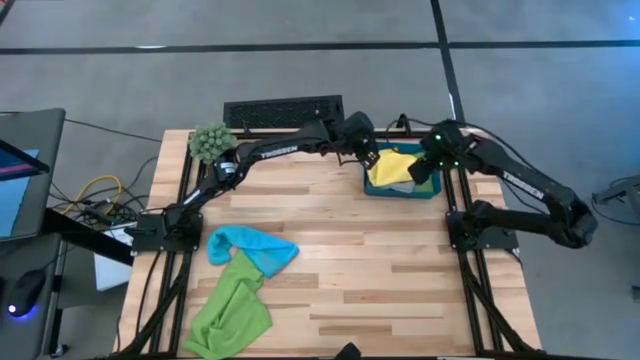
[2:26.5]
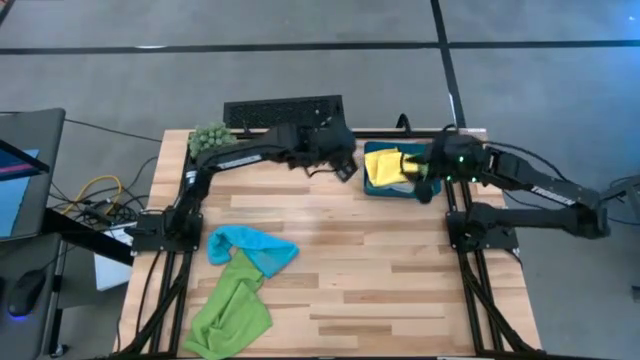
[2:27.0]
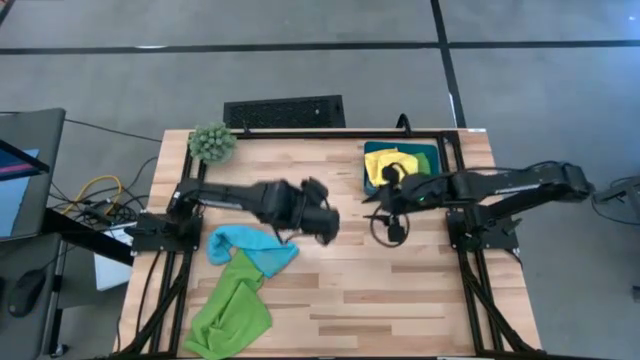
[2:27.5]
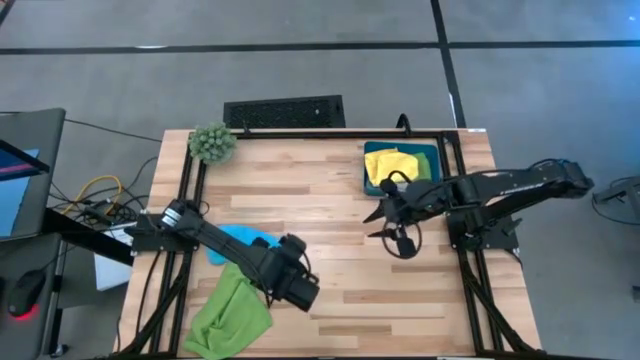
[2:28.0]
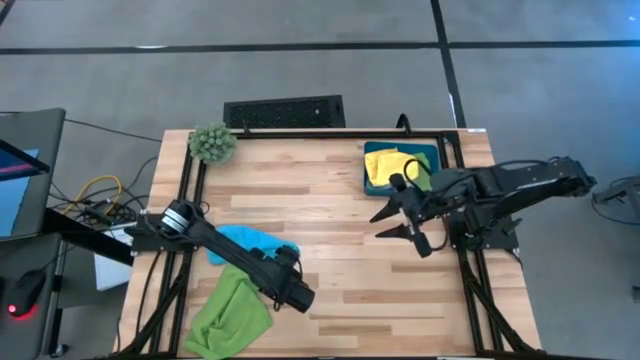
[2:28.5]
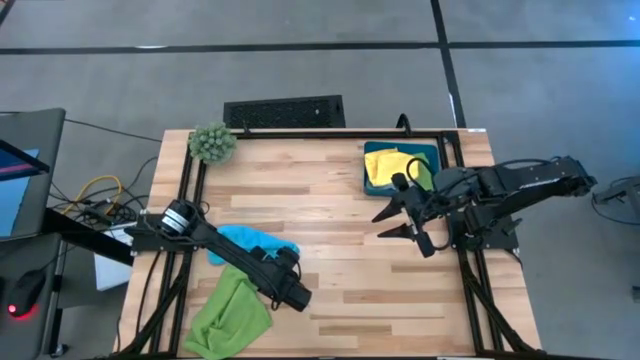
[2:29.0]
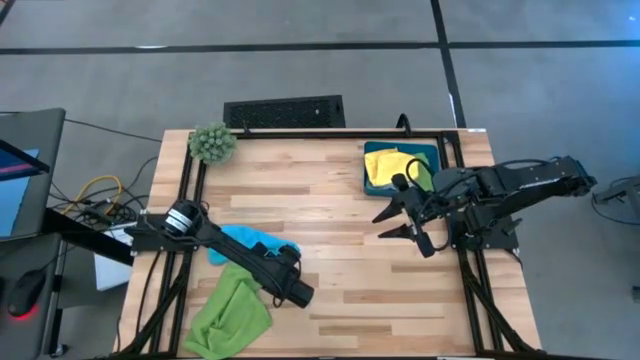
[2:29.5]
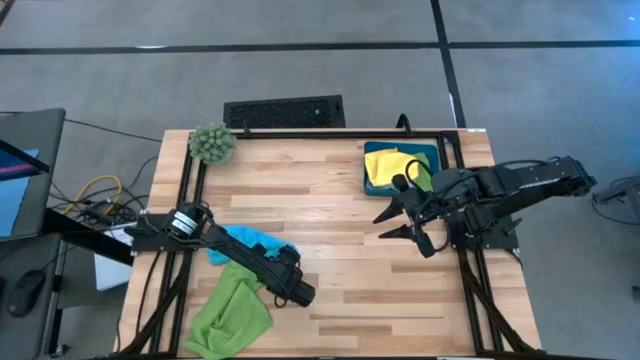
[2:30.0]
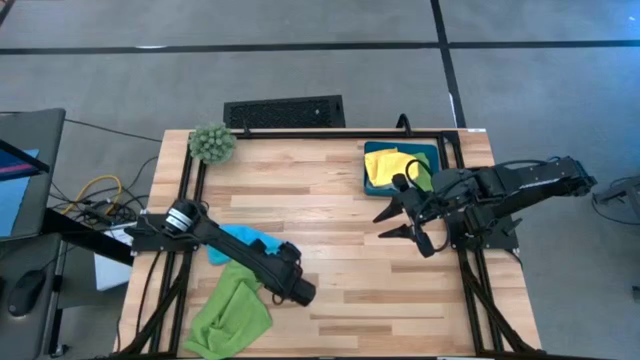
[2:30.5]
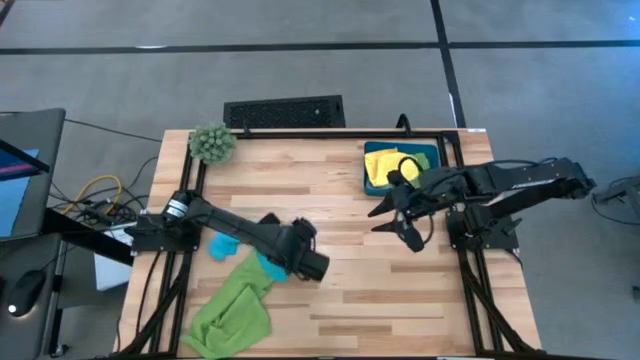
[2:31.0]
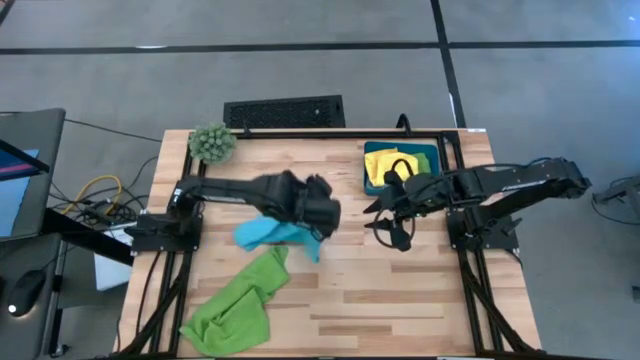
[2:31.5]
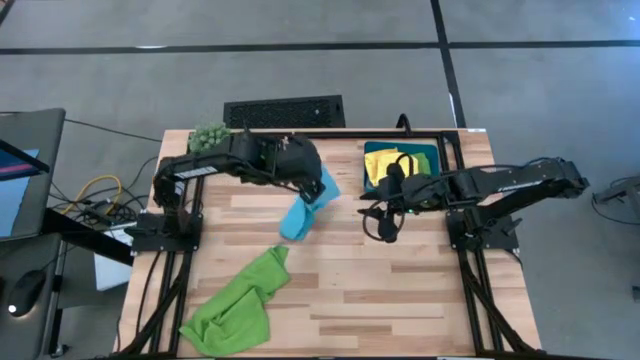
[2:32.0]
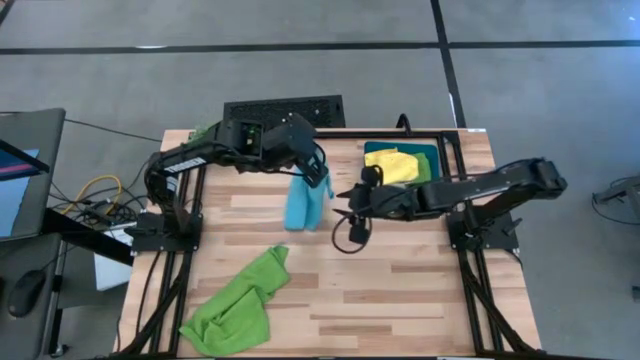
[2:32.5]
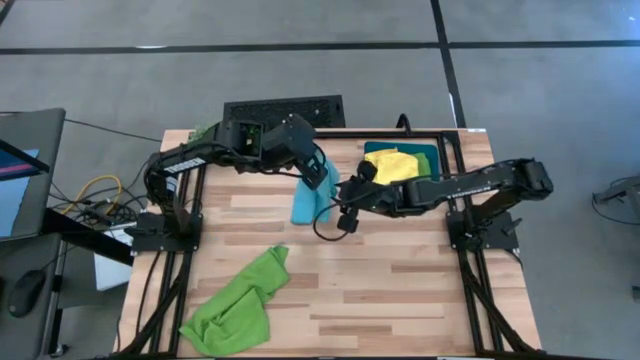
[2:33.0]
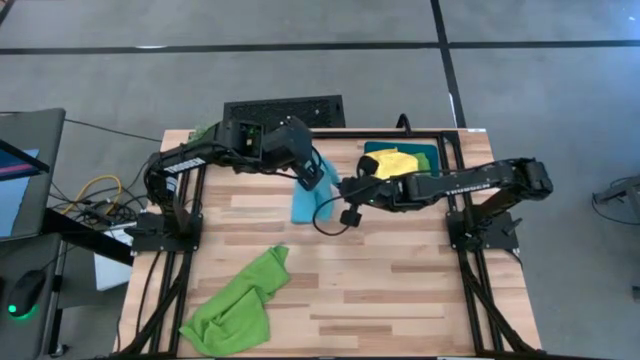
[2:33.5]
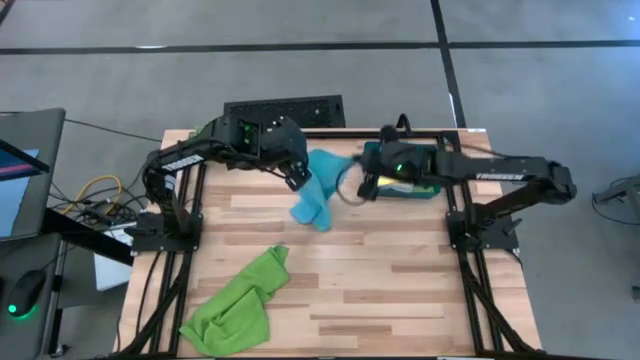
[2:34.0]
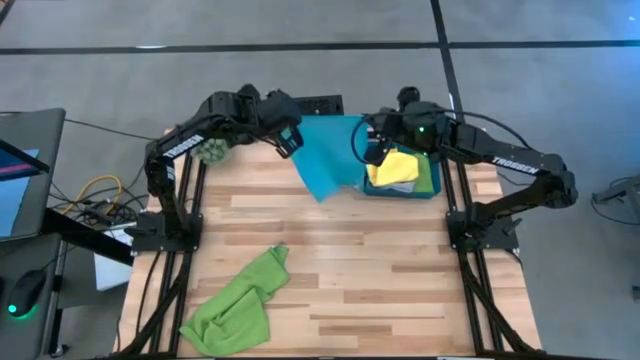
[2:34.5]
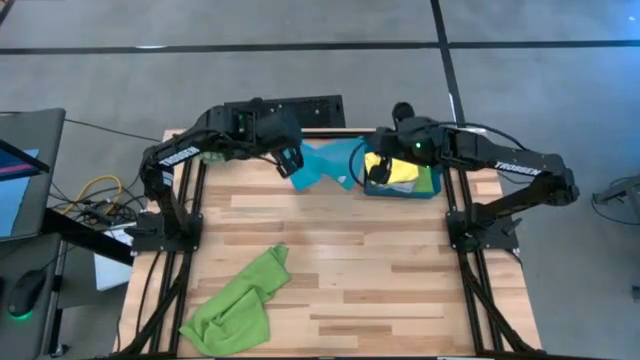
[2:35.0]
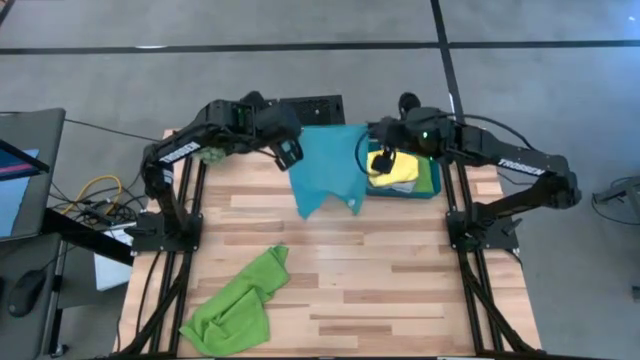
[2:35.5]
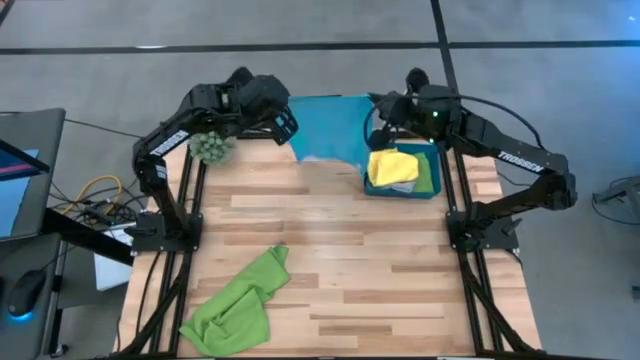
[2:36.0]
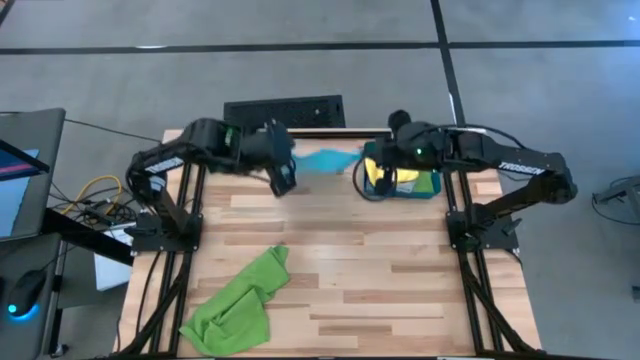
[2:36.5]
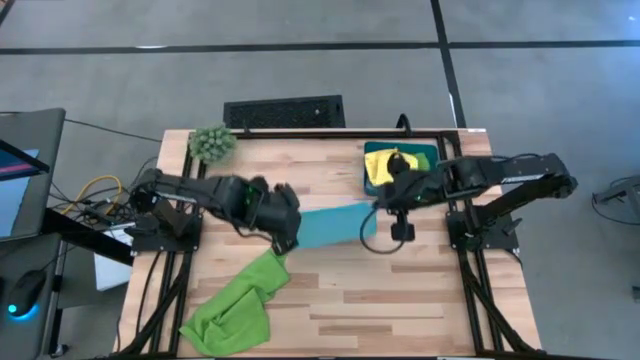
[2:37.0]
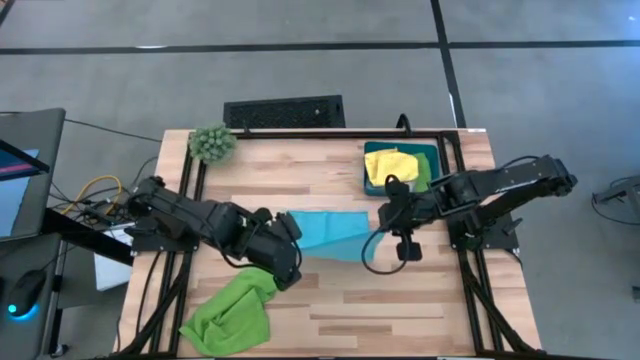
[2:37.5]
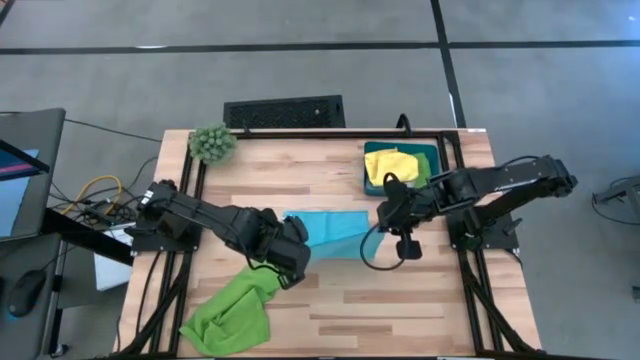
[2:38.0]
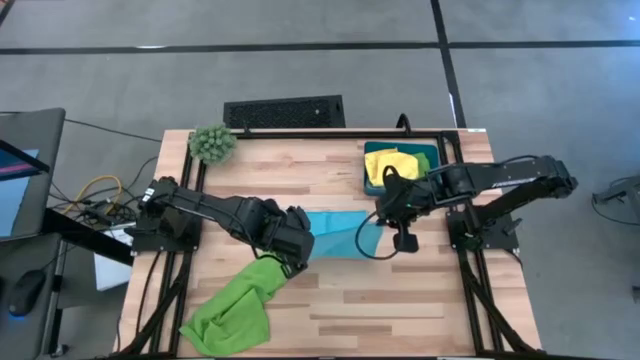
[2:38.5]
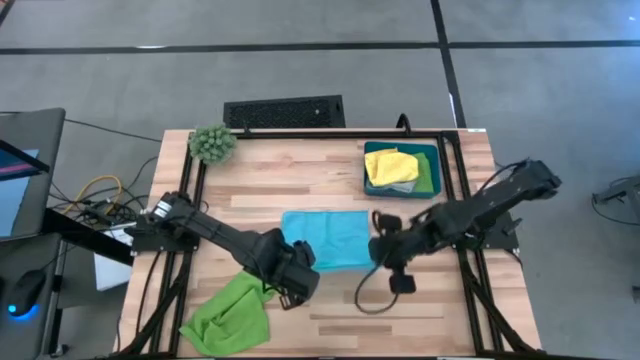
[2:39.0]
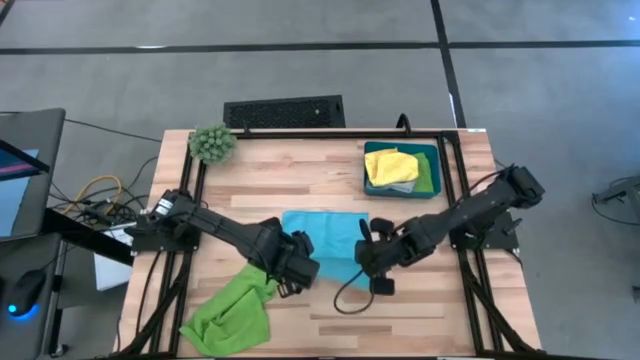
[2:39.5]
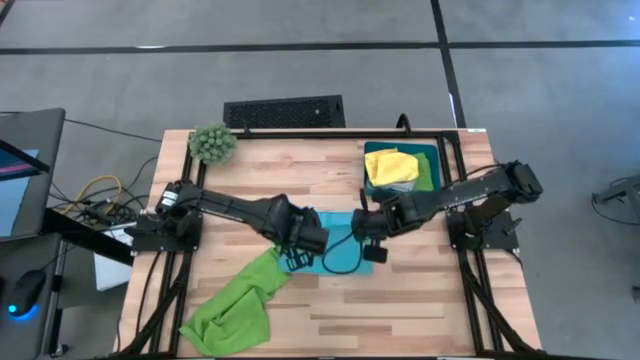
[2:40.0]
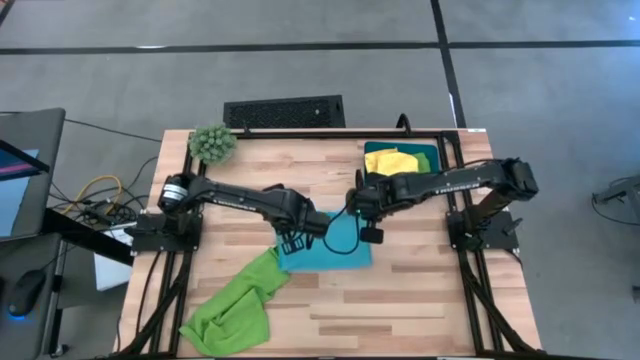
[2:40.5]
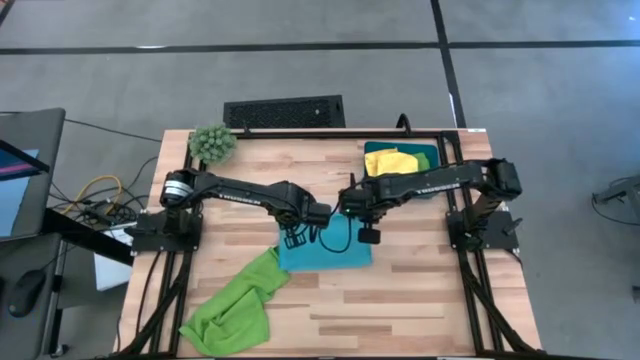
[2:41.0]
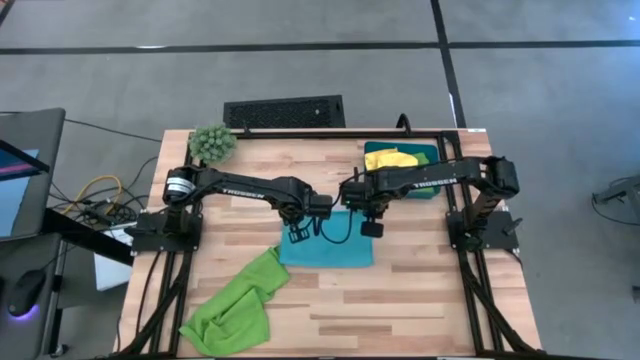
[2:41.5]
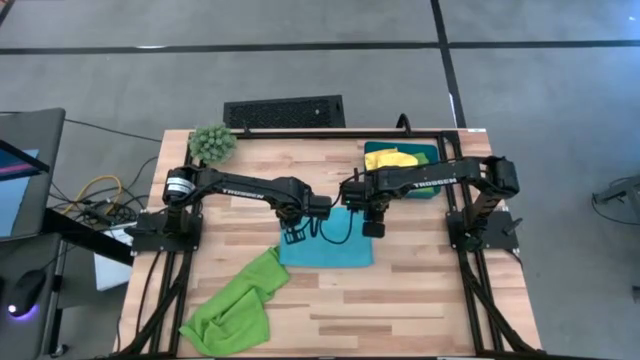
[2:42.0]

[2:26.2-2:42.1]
Task: Fold microfiber towels
Fold the light blue microfiber cloth

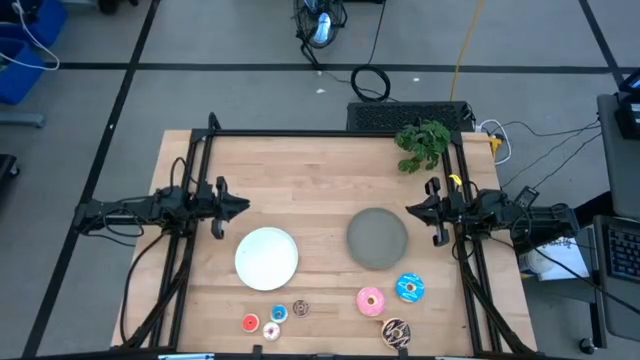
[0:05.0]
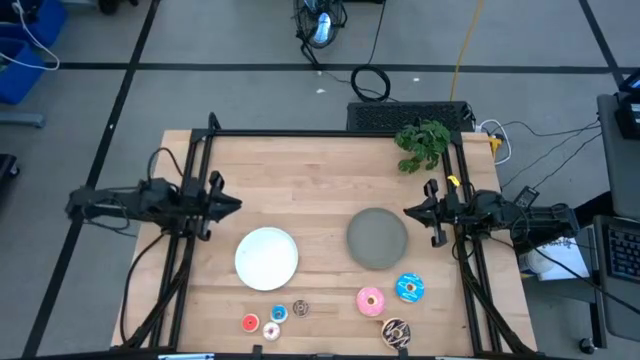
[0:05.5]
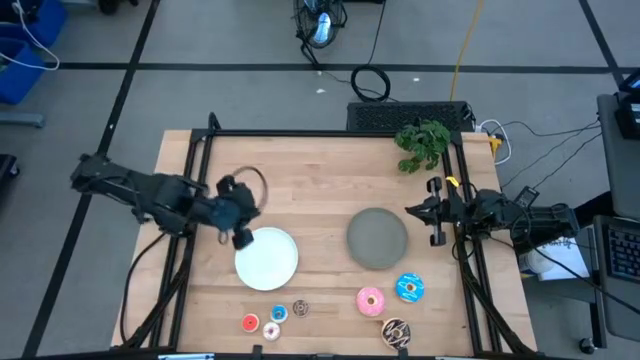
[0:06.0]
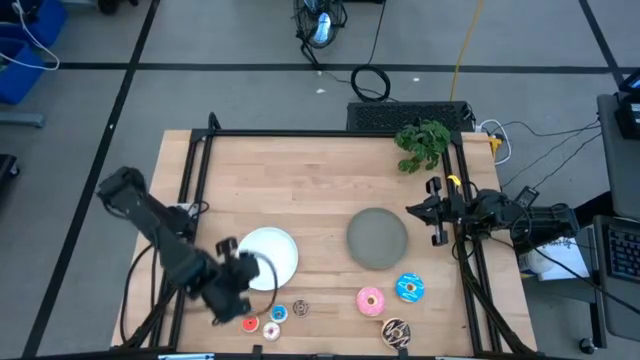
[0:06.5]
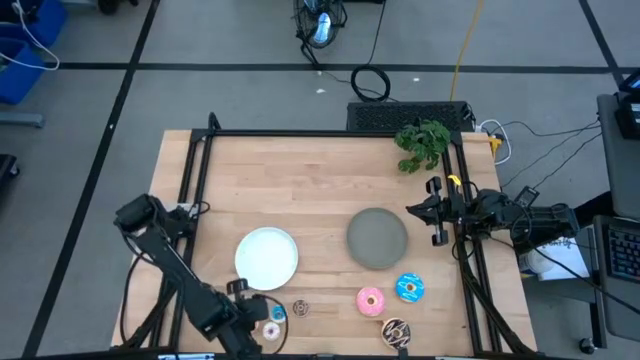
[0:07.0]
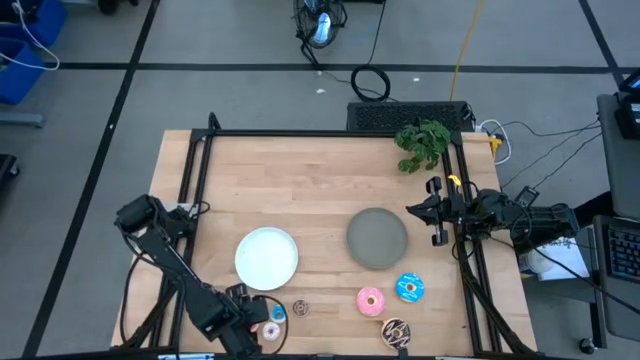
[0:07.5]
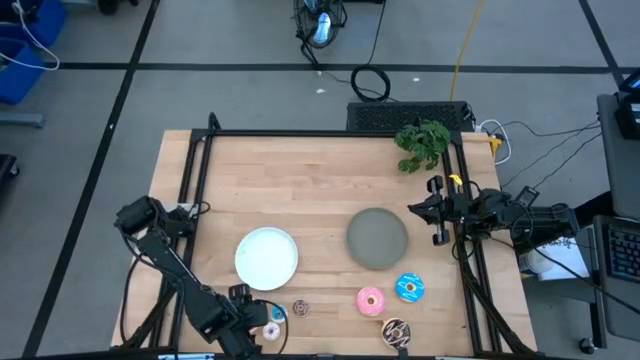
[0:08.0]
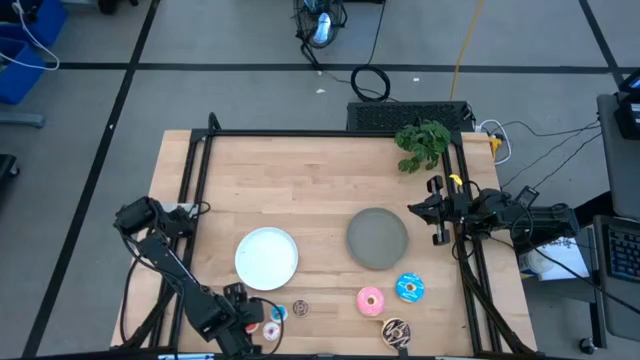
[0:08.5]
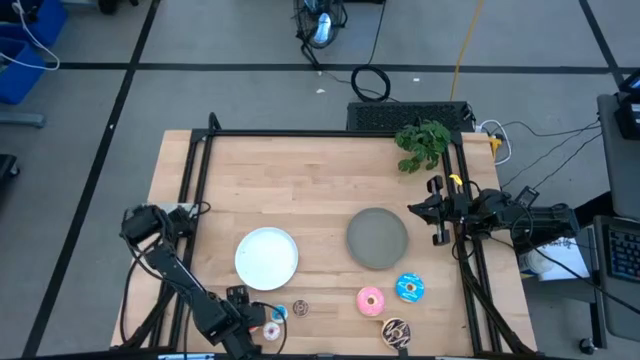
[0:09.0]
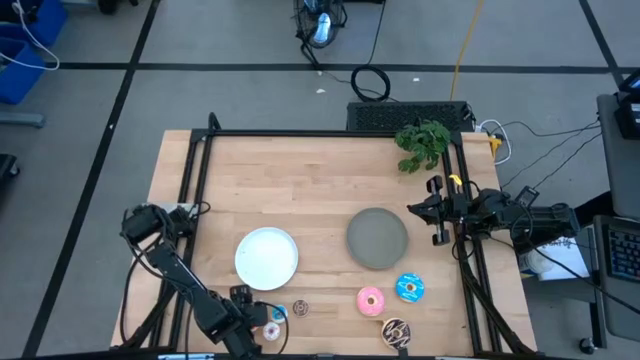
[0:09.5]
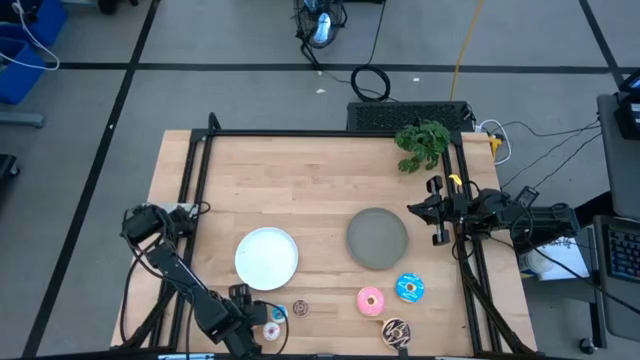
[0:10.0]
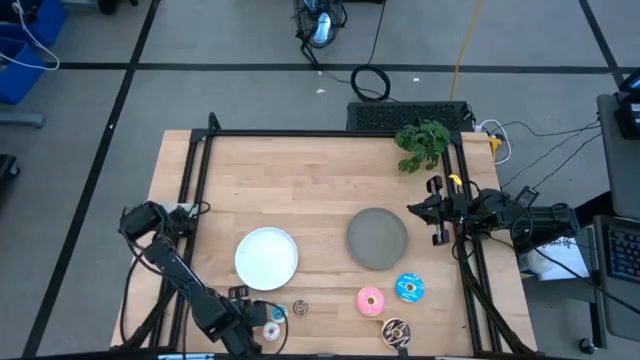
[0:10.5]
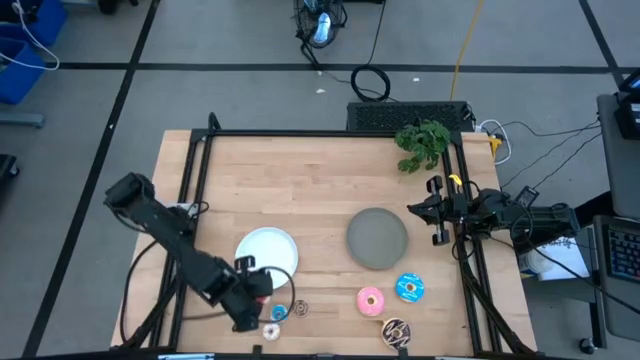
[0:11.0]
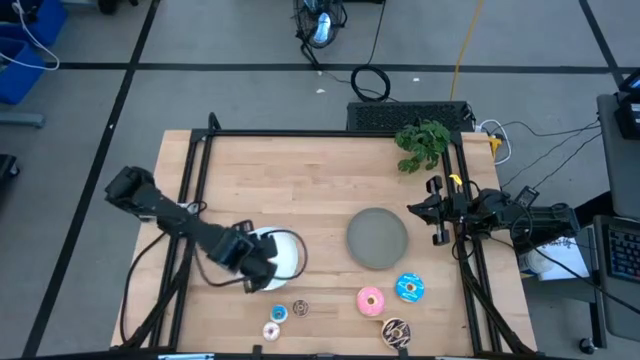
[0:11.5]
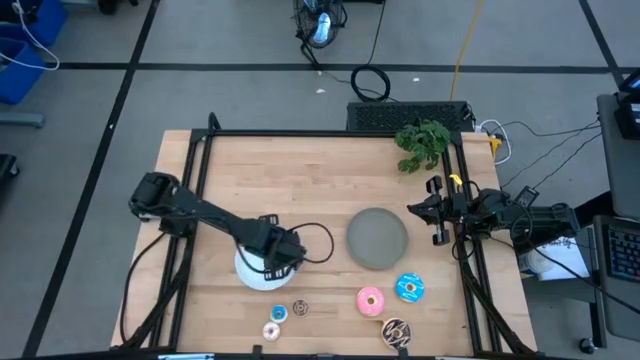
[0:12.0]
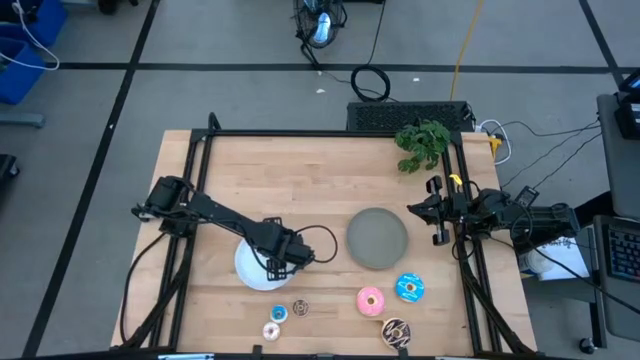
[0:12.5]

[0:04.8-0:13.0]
Task: Pick & Place donuts
Put the small orange donut on the white plate
